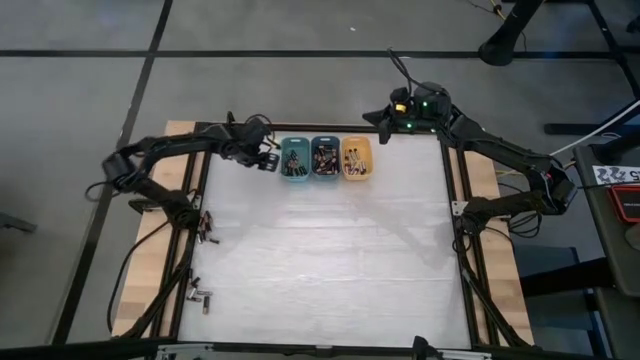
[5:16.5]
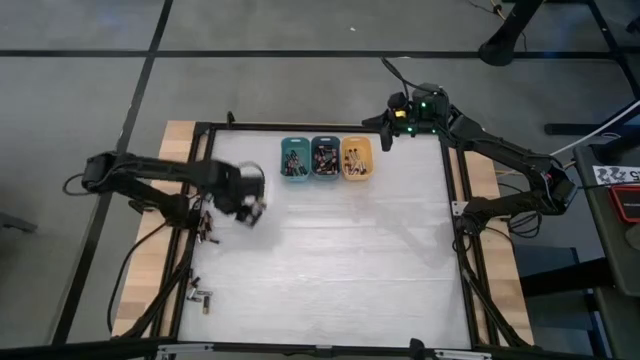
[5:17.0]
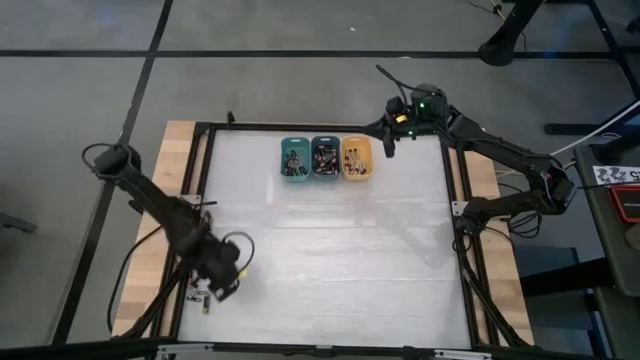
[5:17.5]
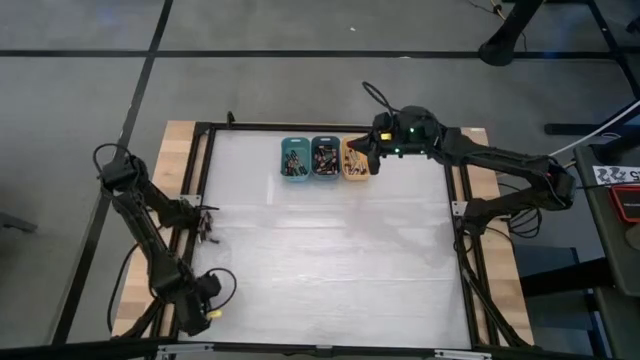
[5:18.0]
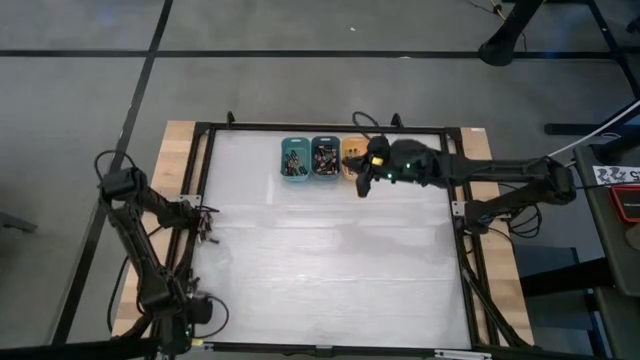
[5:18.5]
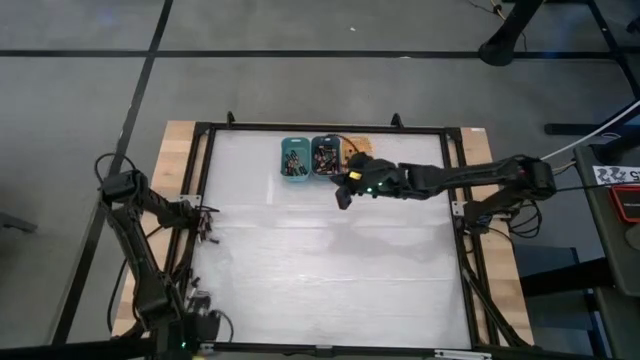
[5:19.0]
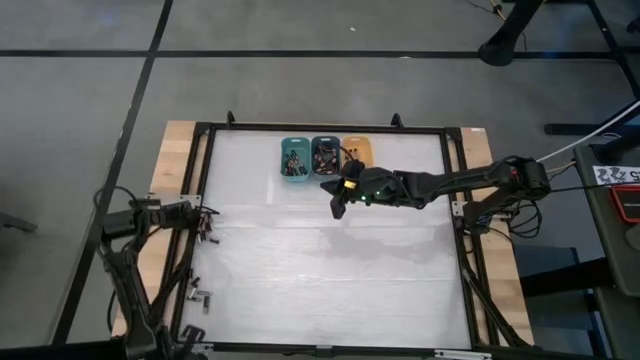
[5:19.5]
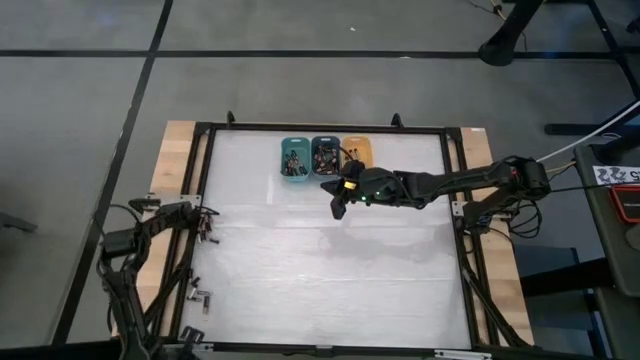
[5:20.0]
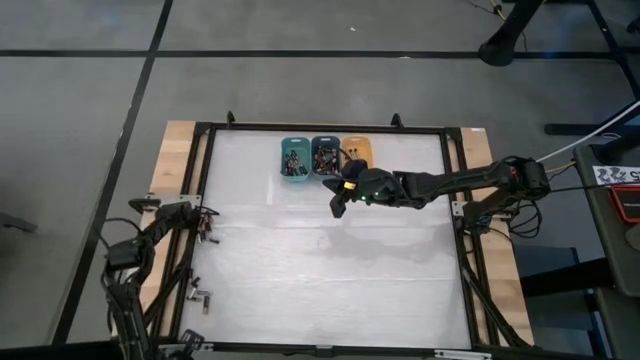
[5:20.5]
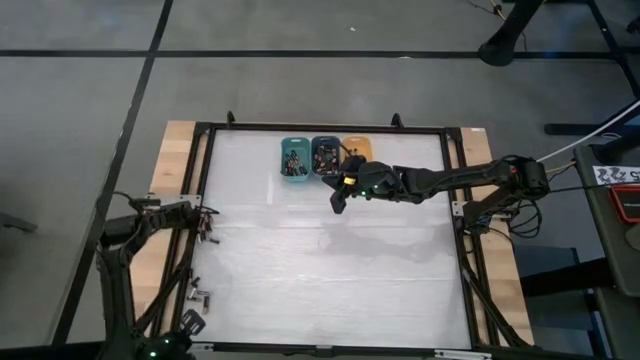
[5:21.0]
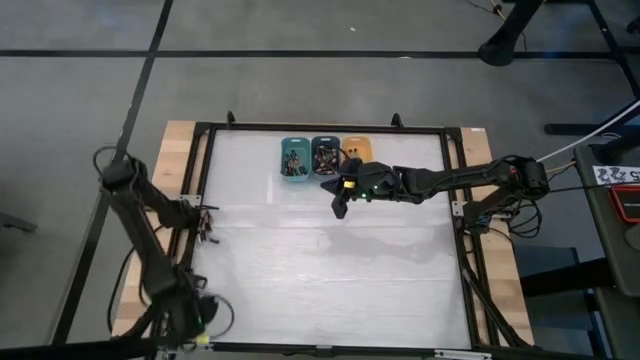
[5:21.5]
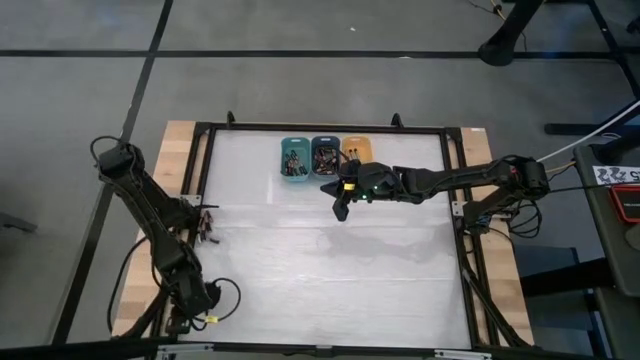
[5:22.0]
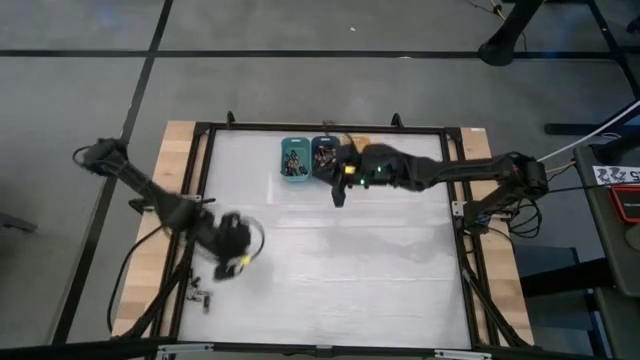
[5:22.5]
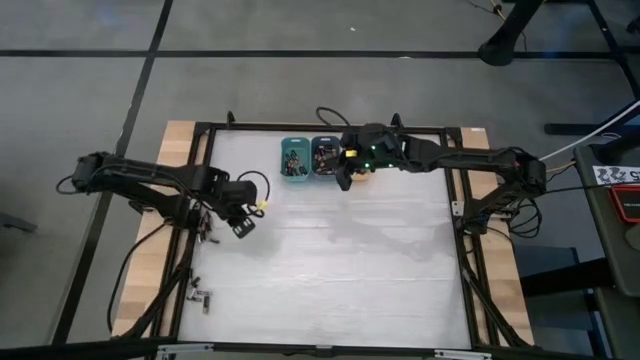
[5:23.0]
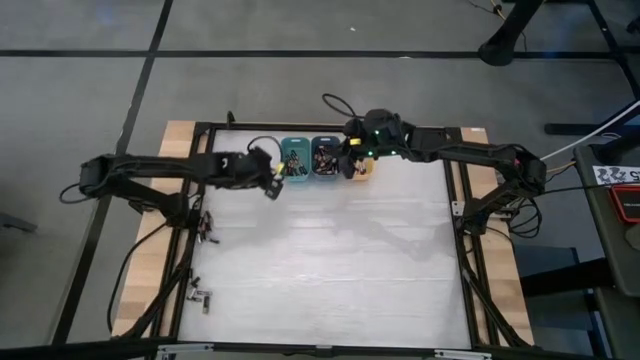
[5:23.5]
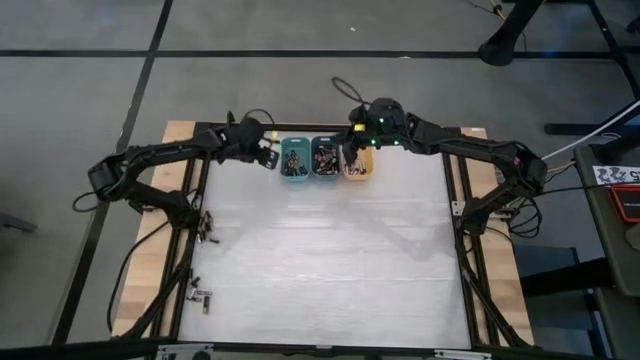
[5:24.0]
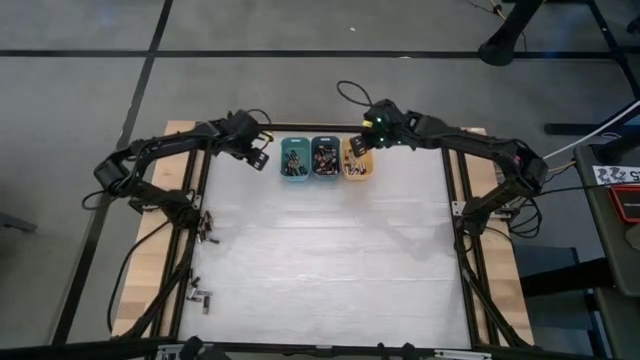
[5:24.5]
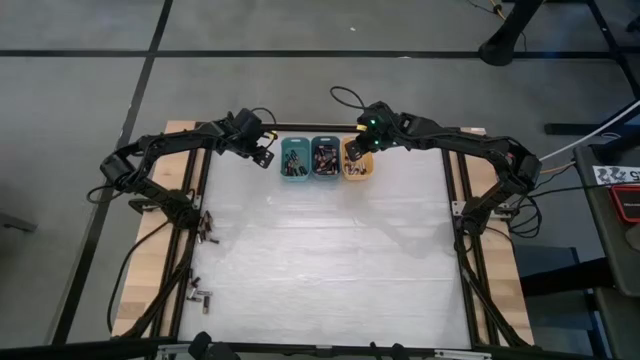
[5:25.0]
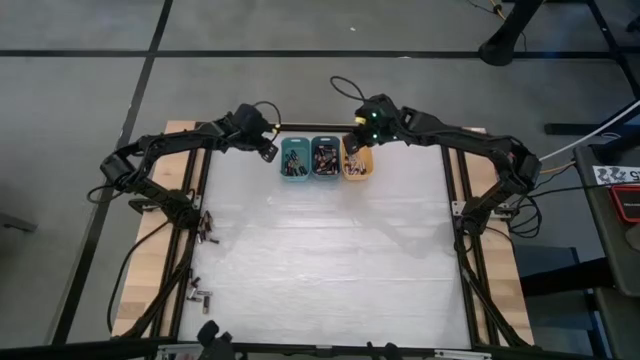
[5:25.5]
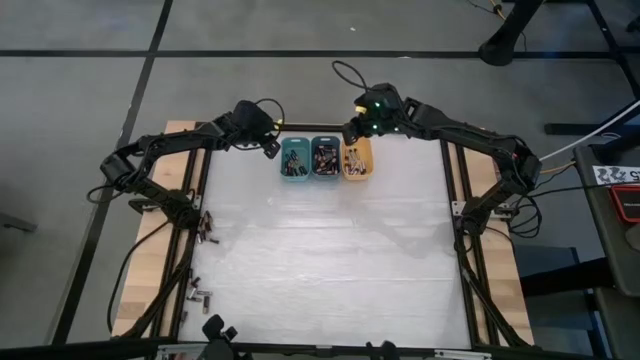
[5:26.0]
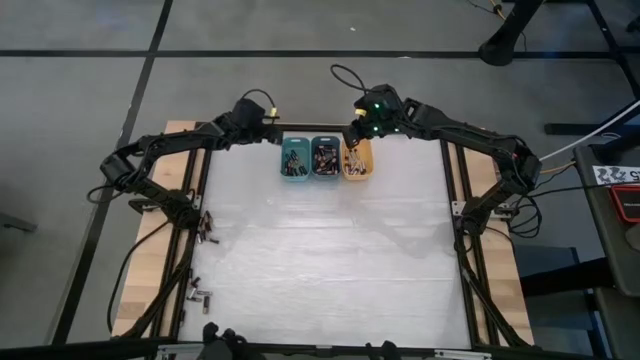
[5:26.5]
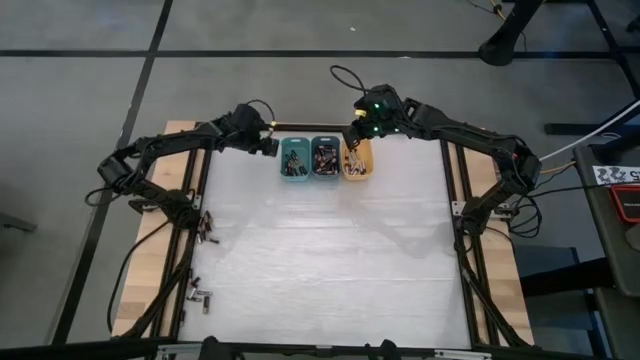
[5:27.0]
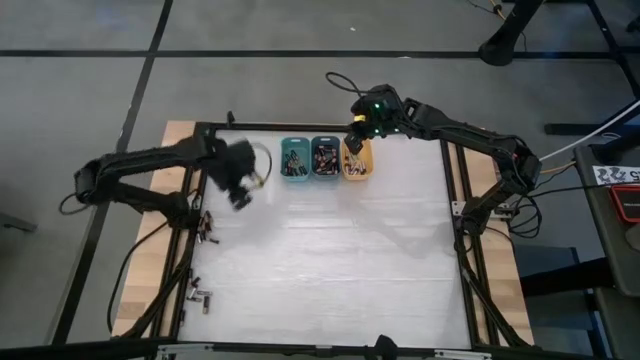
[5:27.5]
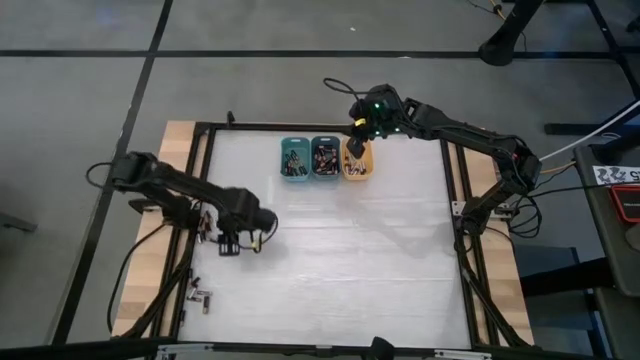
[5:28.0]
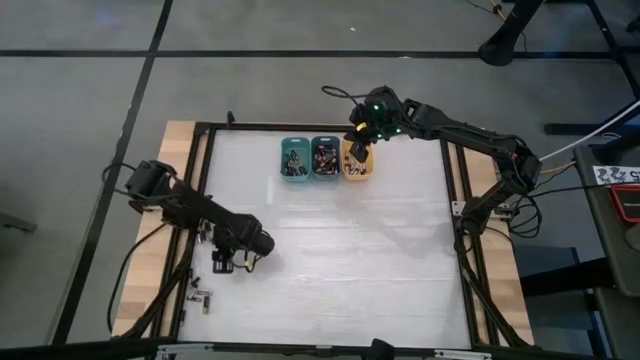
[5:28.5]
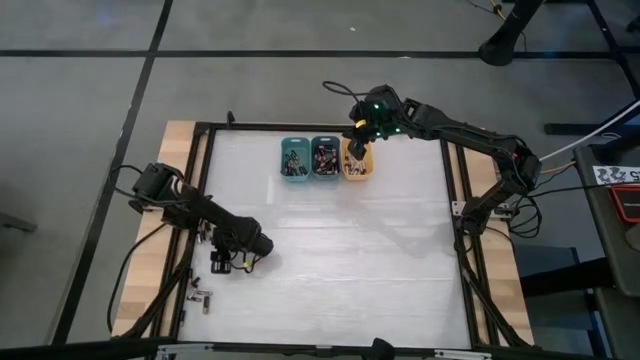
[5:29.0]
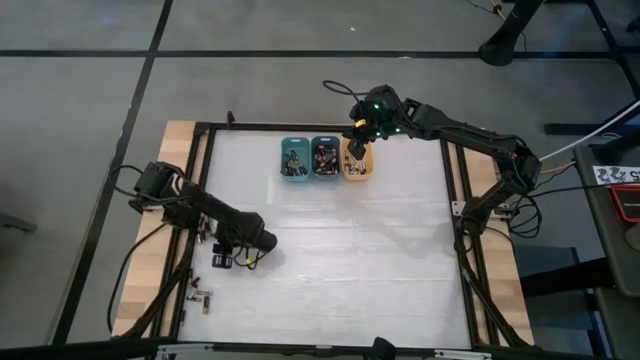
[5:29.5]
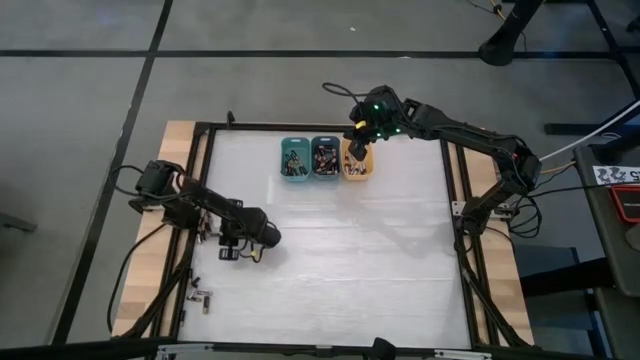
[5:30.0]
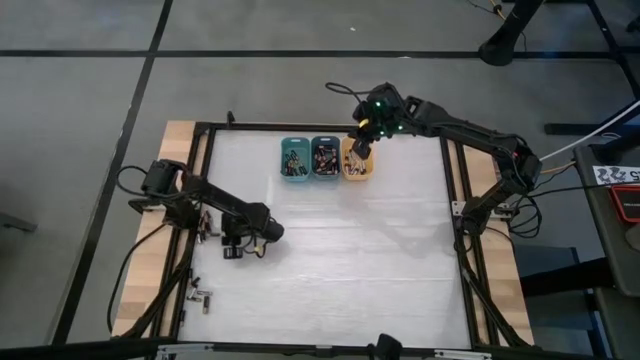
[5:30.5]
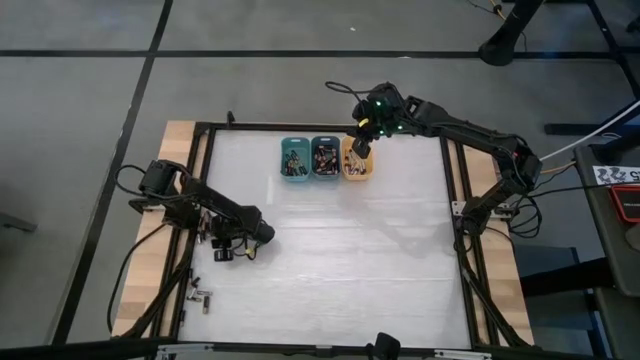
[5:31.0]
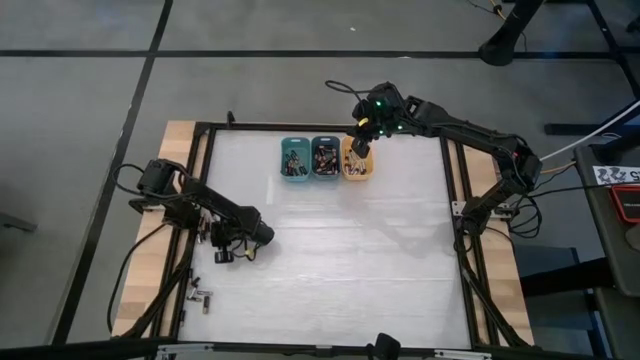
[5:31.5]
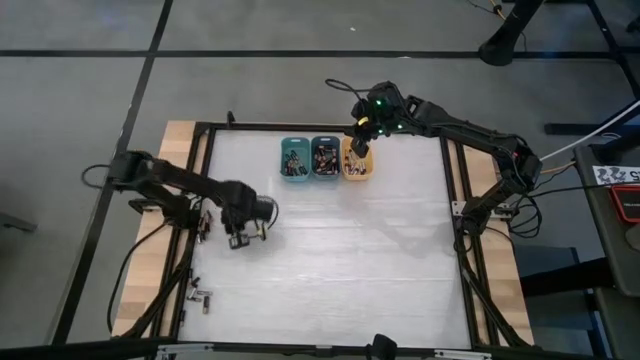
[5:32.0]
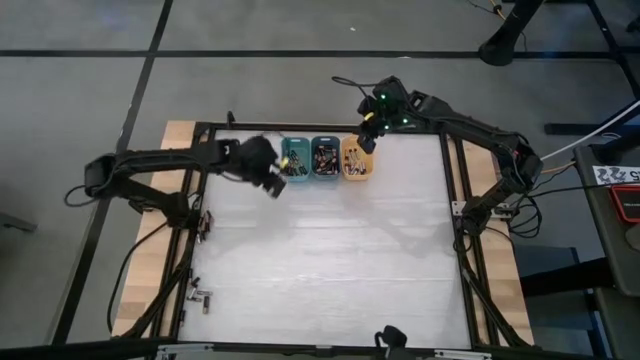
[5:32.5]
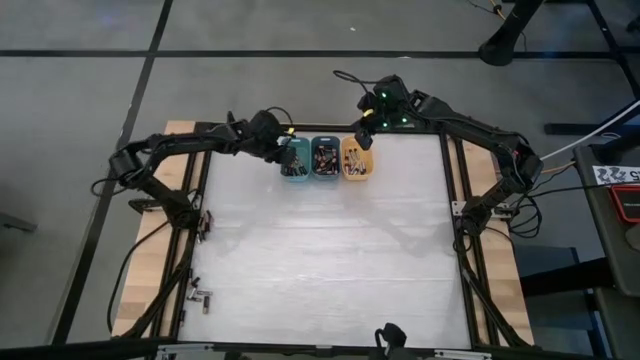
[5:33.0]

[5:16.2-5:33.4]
Task: Sort batteries
Put the brown battery into the green bin

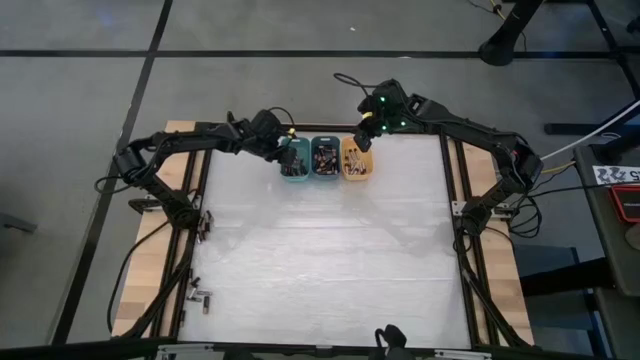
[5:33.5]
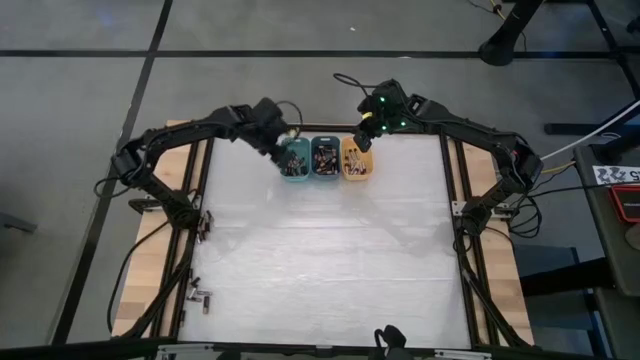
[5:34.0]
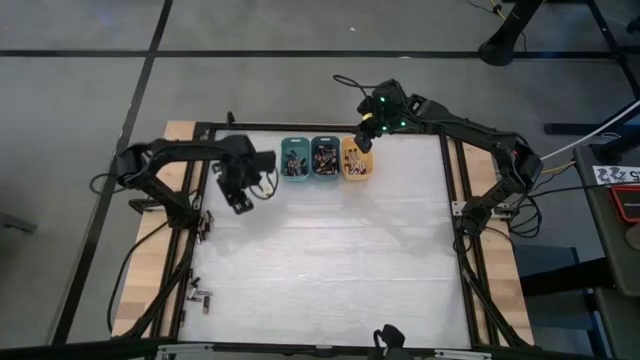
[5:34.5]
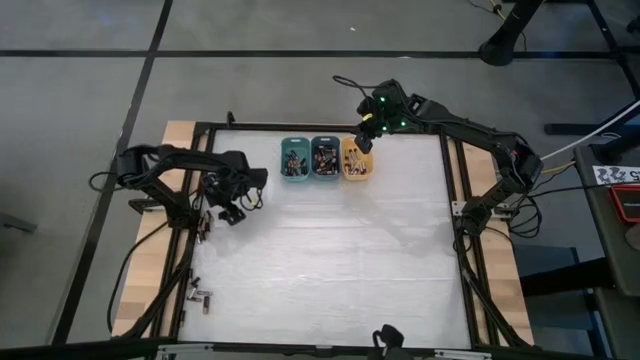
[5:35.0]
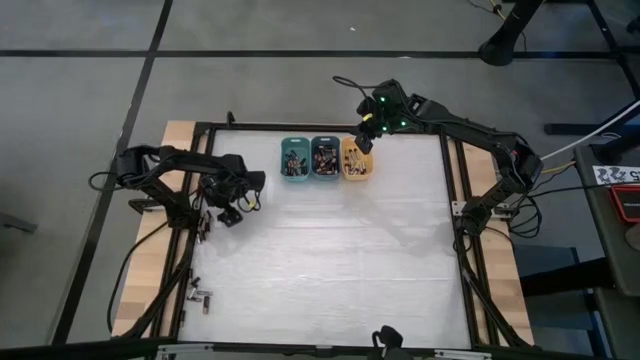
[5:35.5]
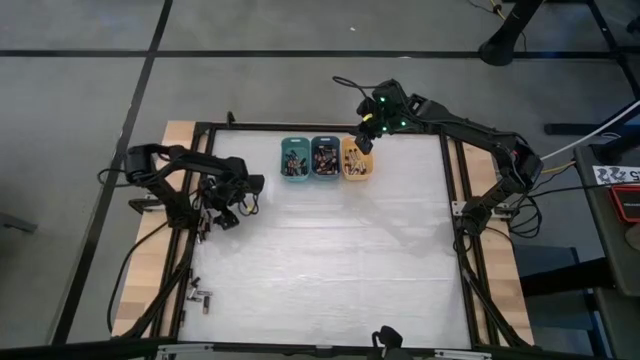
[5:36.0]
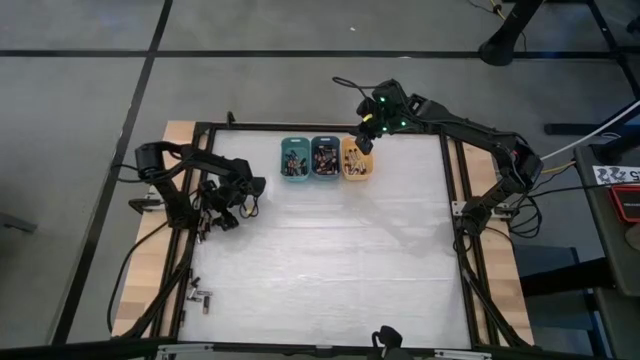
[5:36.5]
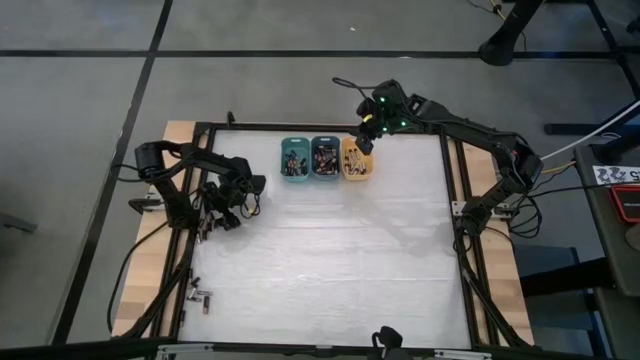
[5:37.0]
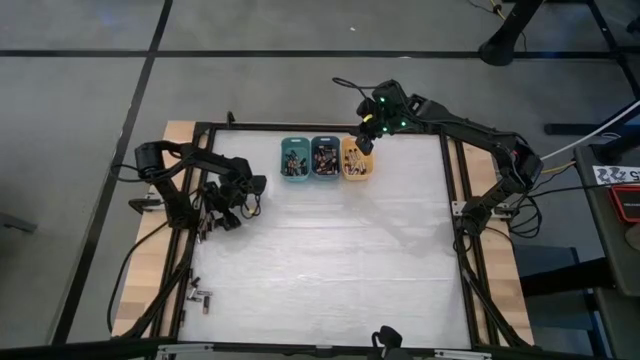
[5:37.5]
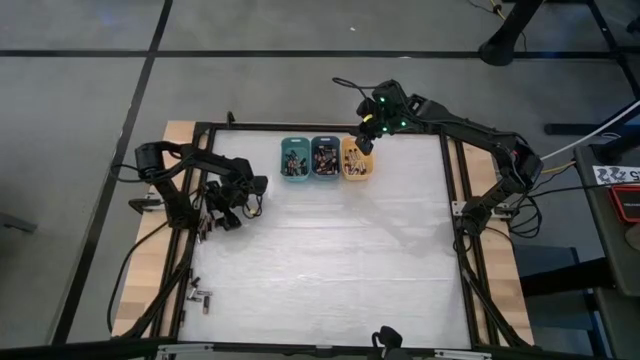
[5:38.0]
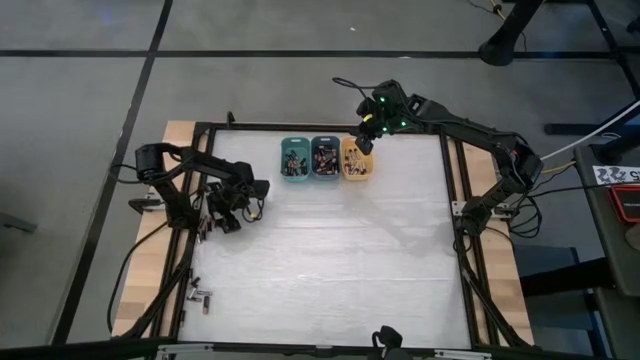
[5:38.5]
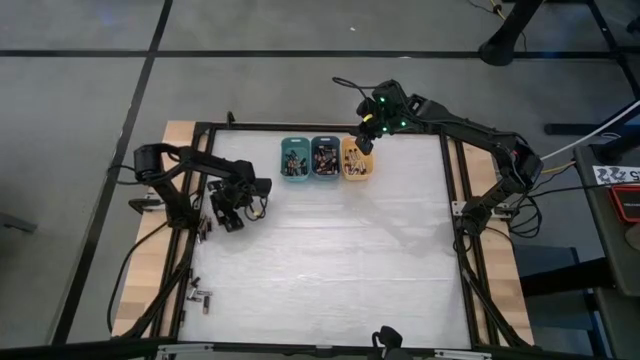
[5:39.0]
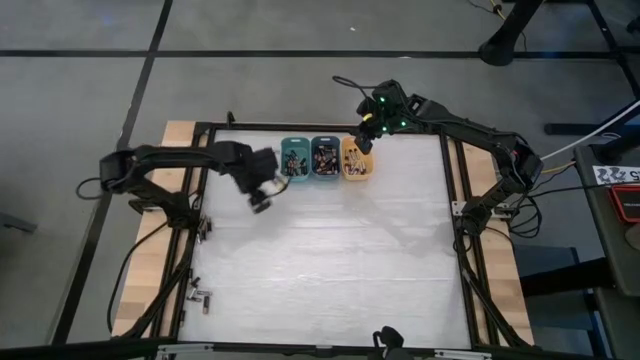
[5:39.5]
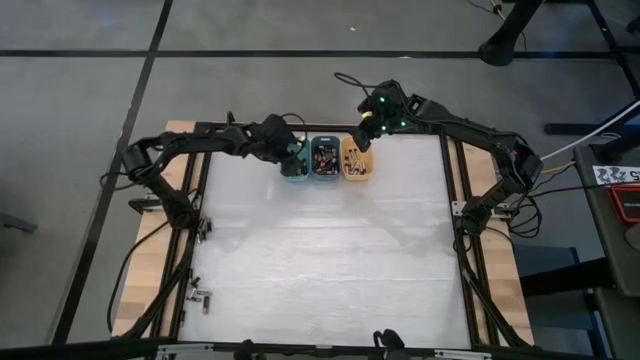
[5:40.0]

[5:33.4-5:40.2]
Put the brown battery into the green bin
